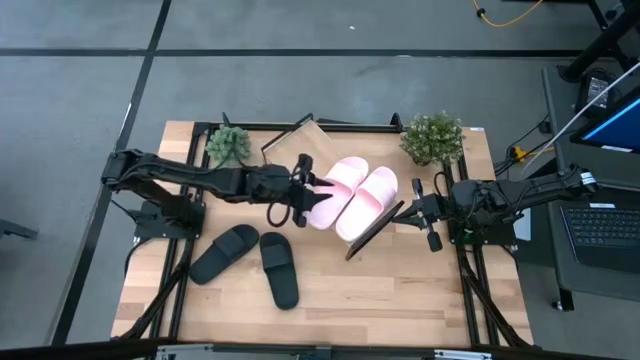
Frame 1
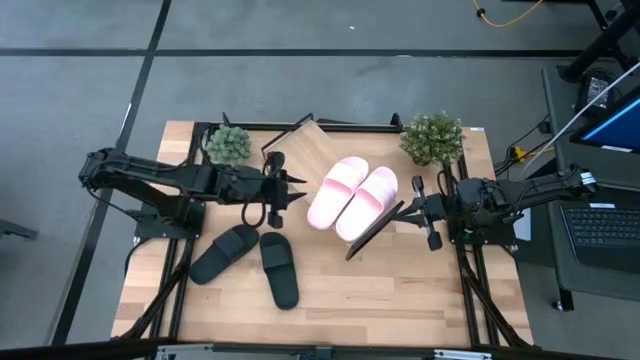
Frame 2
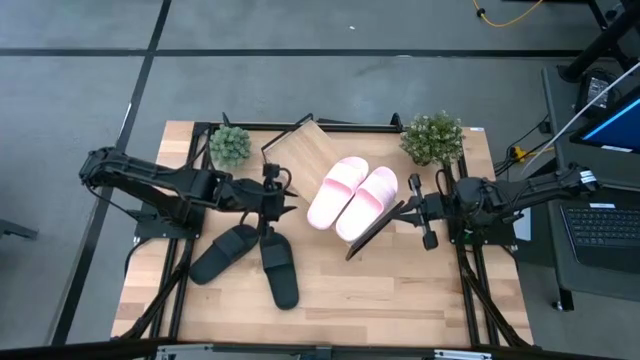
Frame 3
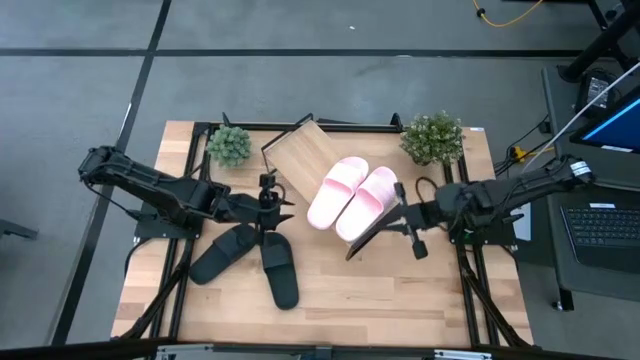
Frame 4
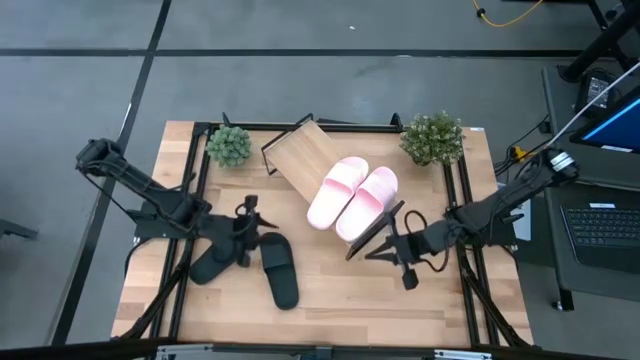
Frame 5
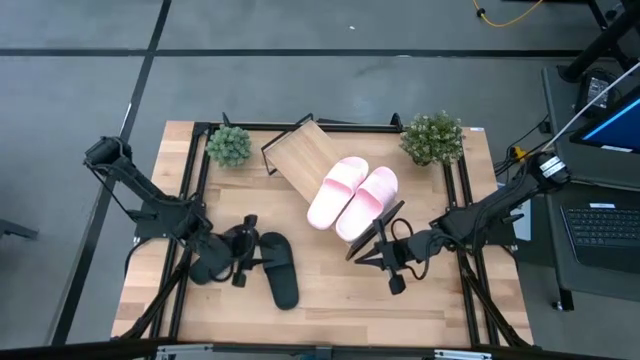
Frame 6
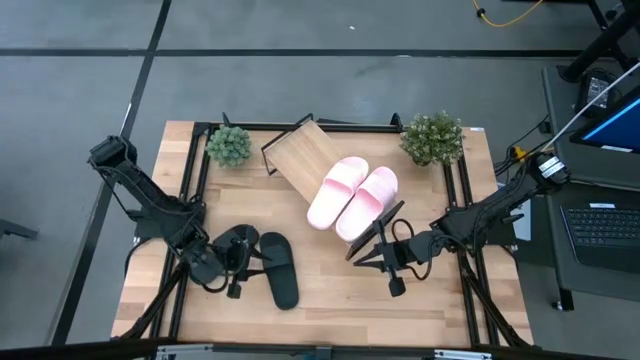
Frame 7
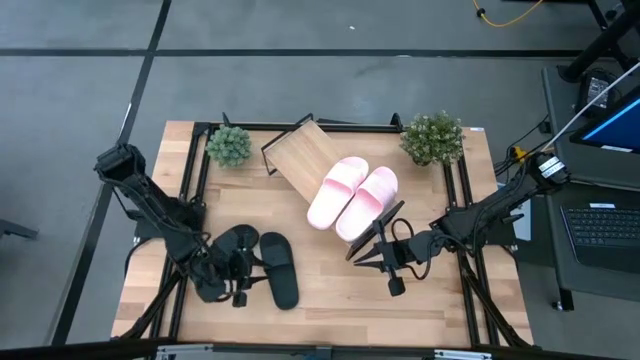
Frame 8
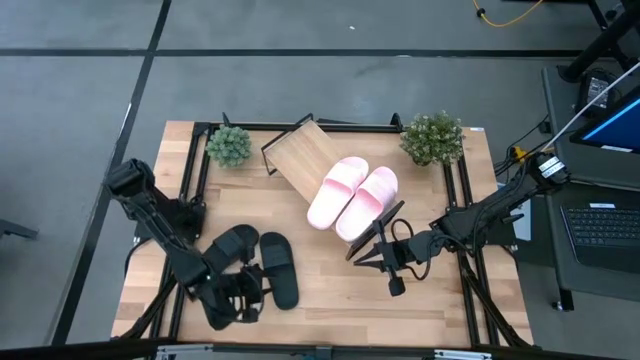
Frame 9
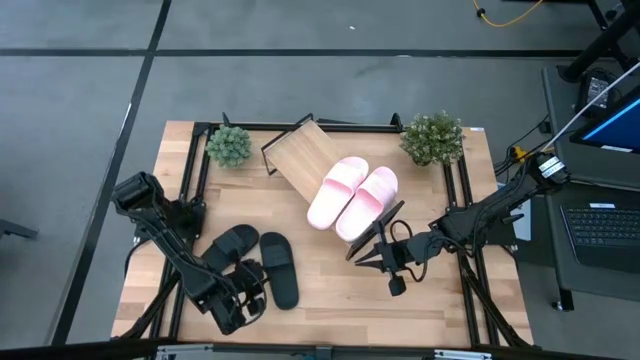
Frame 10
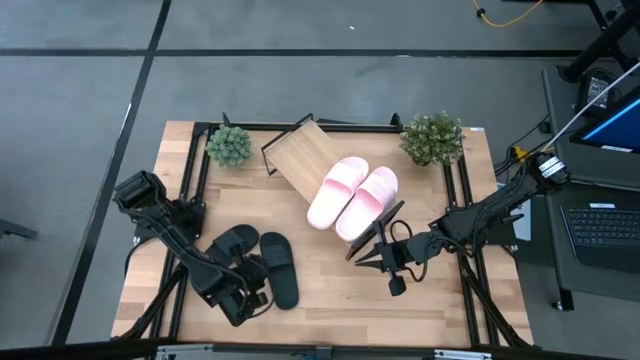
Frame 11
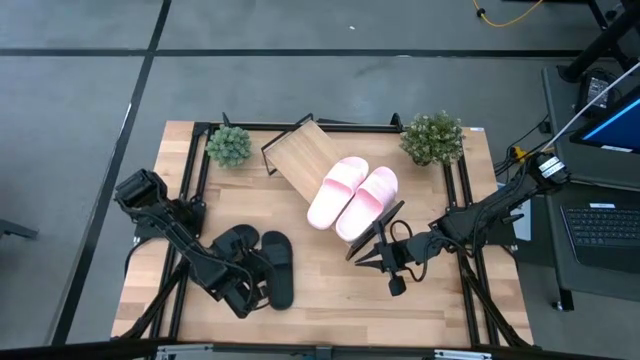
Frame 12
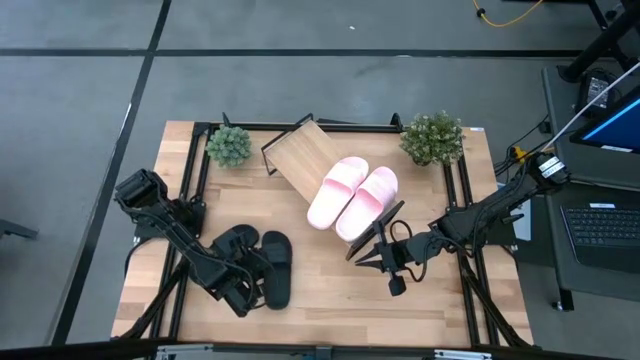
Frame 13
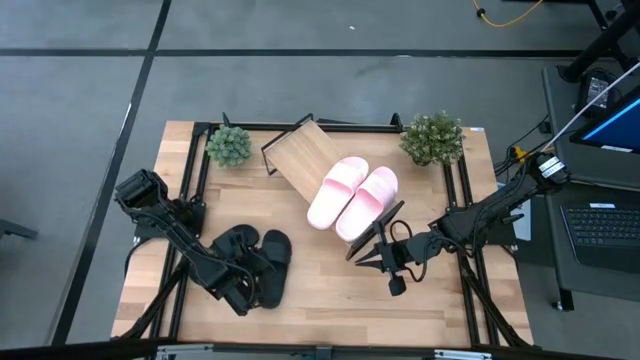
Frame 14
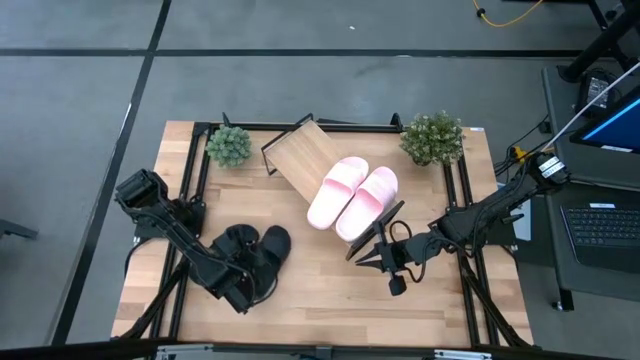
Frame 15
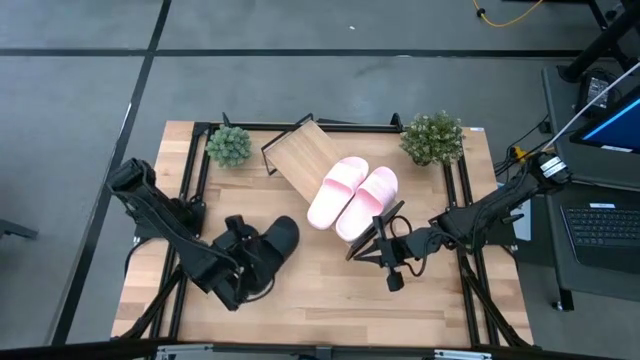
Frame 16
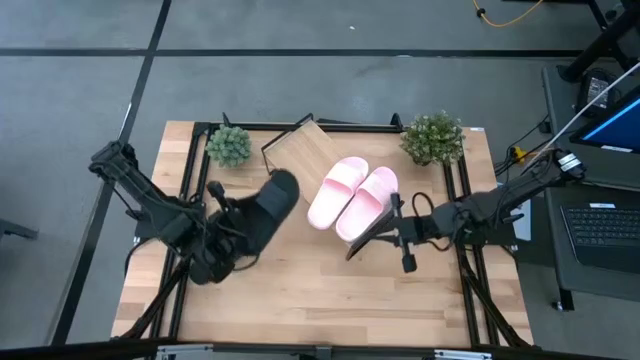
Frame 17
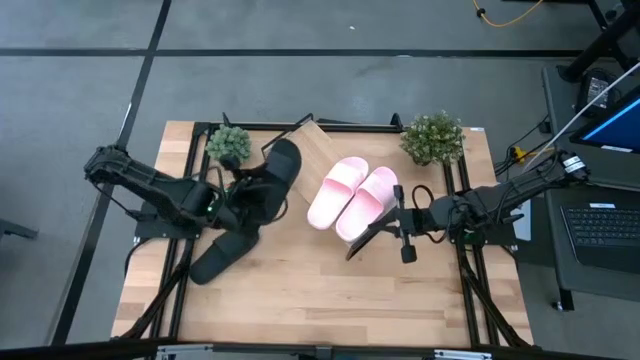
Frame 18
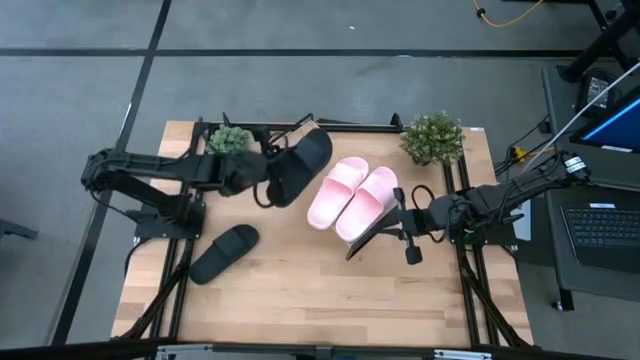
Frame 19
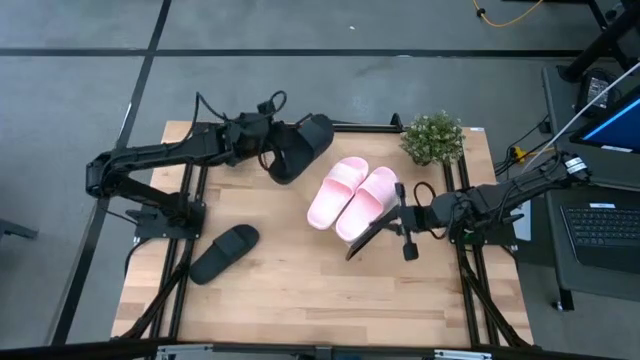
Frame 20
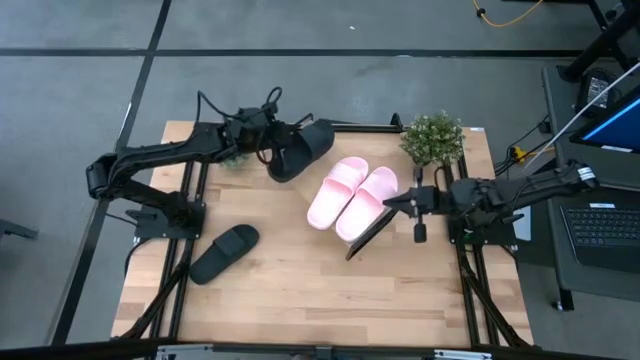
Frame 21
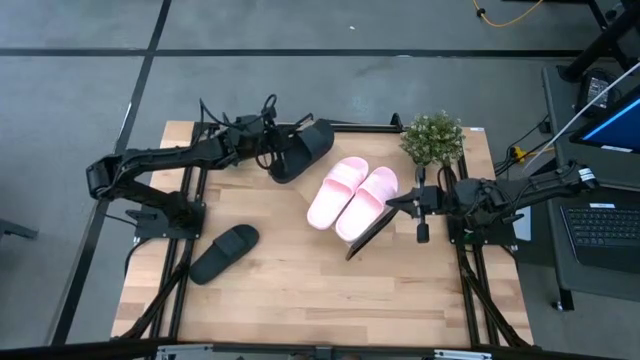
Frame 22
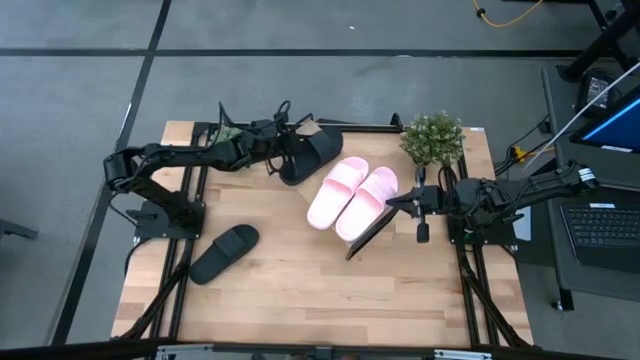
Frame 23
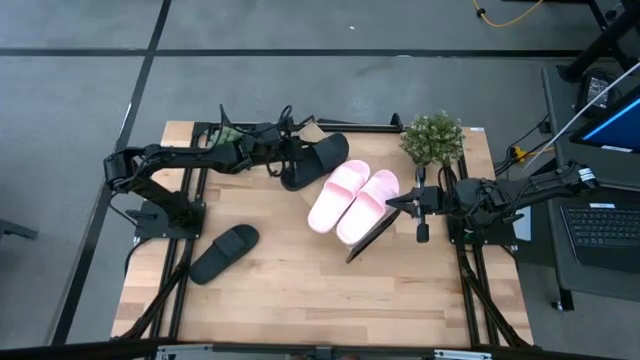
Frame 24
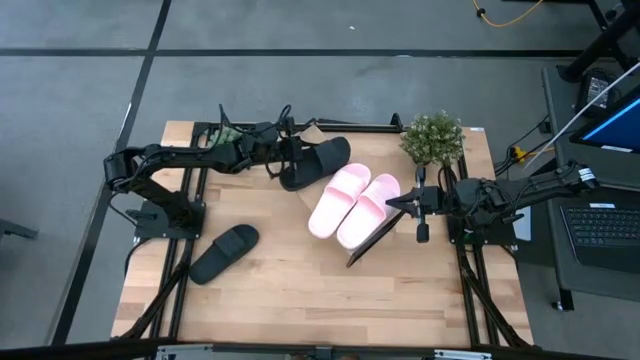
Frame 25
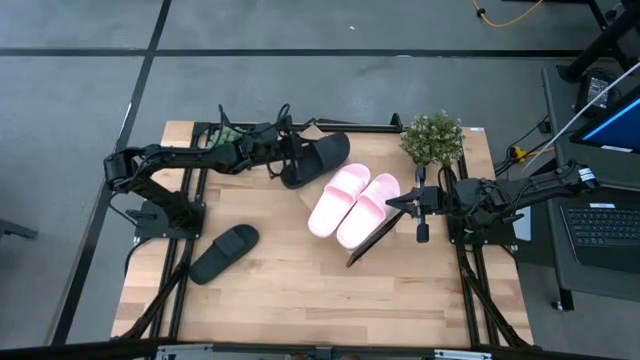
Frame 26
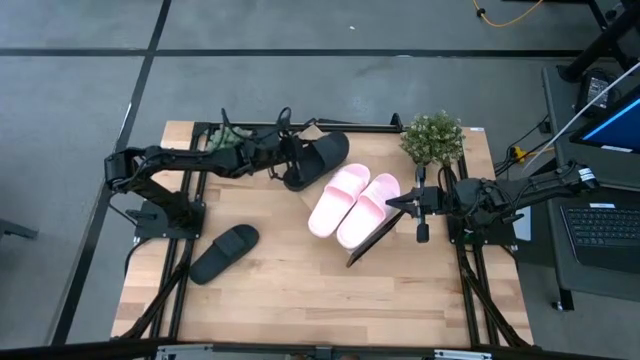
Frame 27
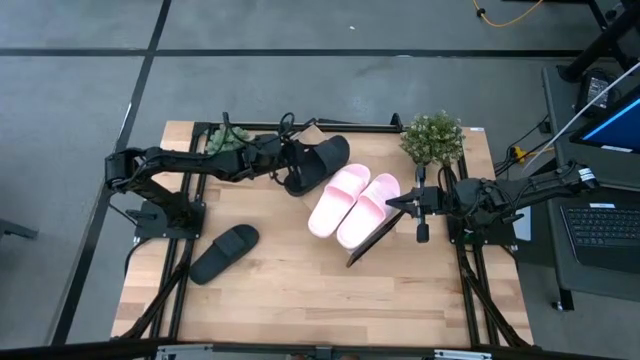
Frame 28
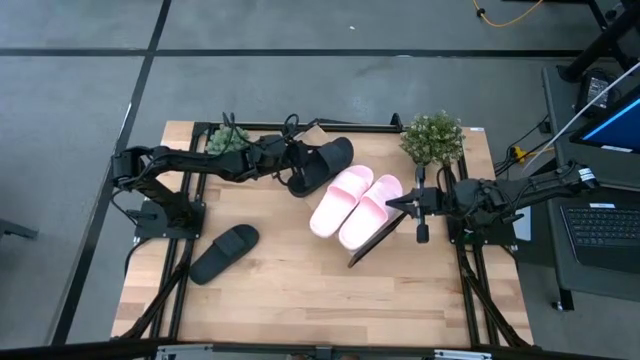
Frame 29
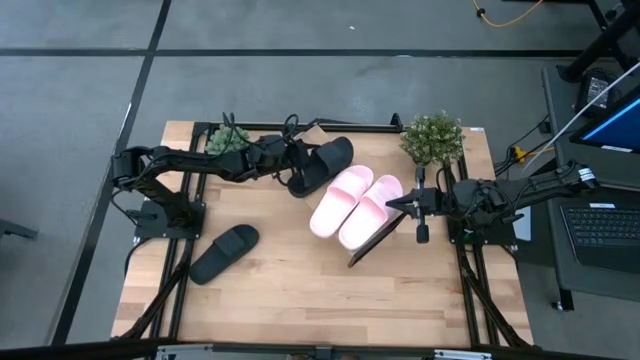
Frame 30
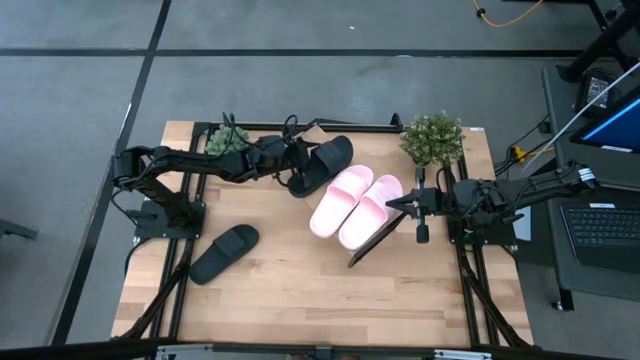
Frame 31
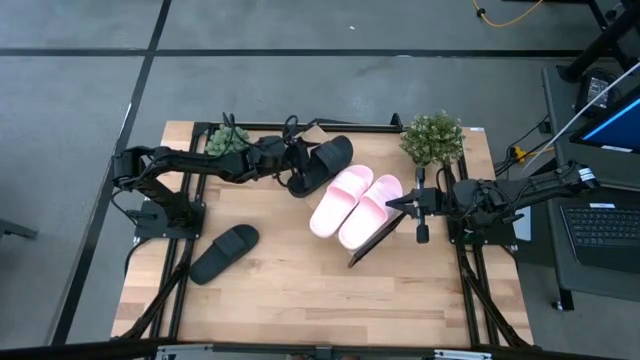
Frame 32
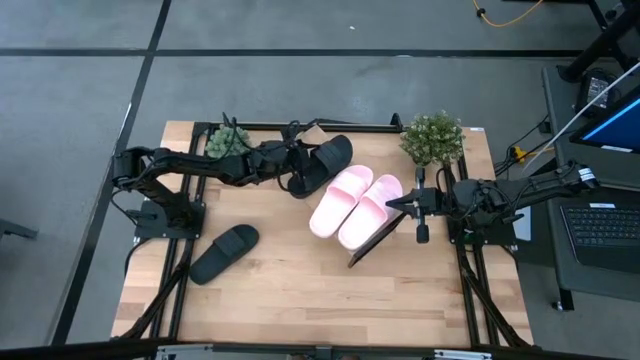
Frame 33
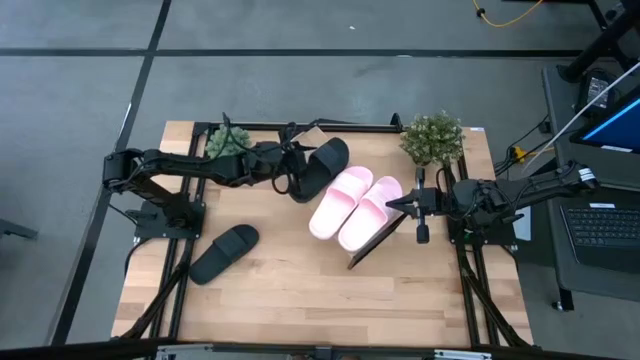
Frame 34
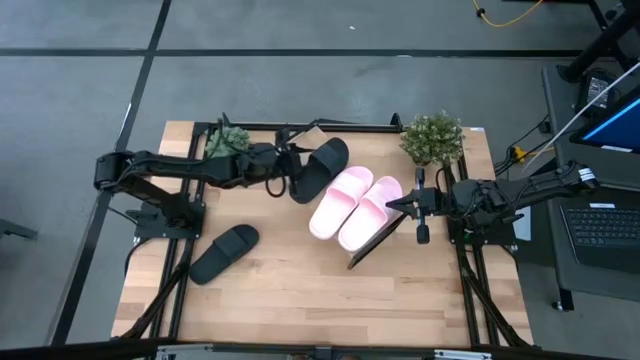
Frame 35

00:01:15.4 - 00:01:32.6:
Task: Pick and place slides into the shelf
Put the right black slipper on the shelf

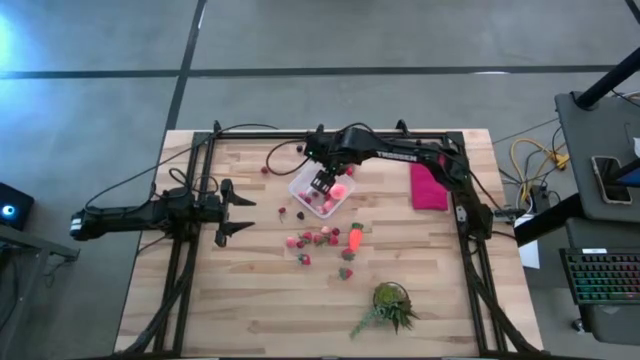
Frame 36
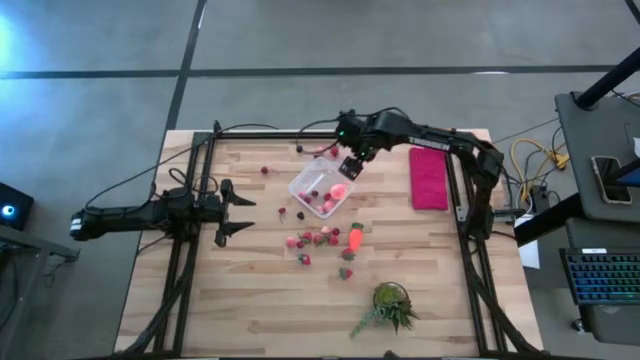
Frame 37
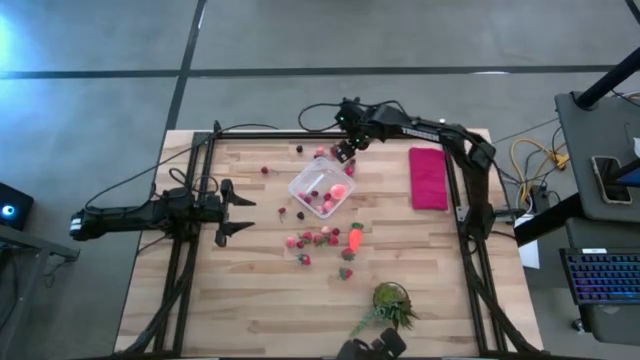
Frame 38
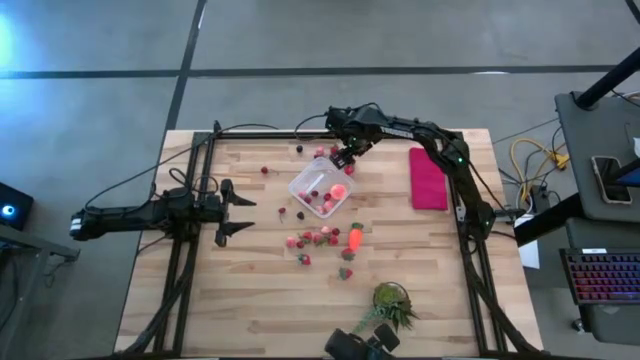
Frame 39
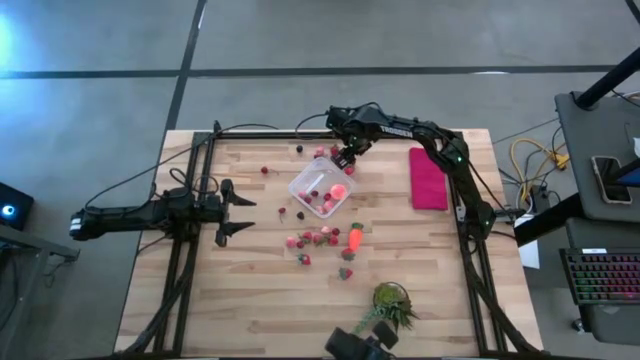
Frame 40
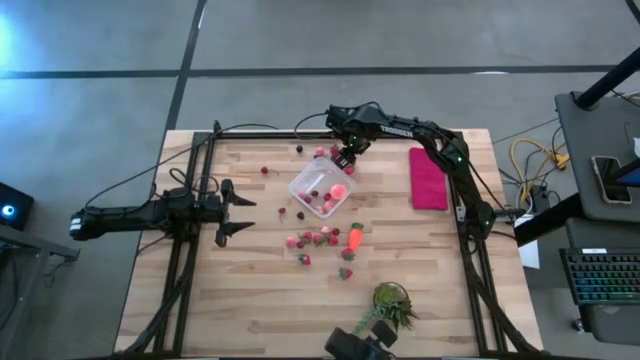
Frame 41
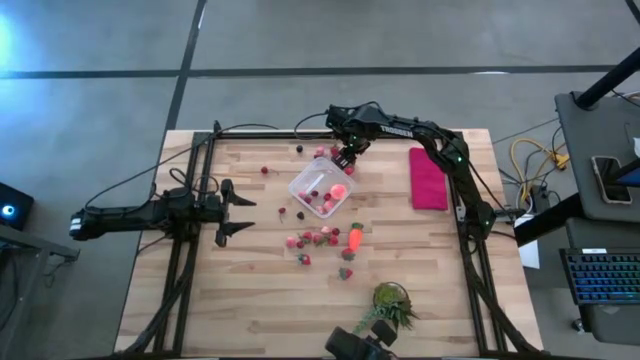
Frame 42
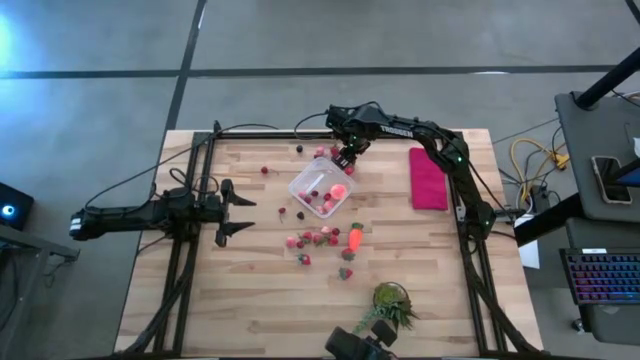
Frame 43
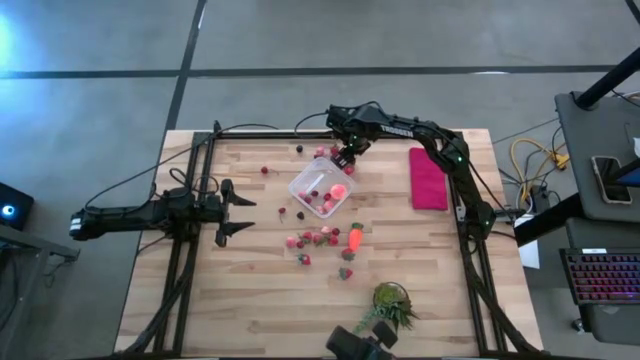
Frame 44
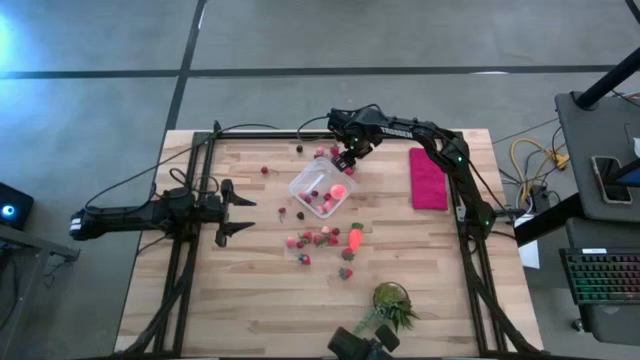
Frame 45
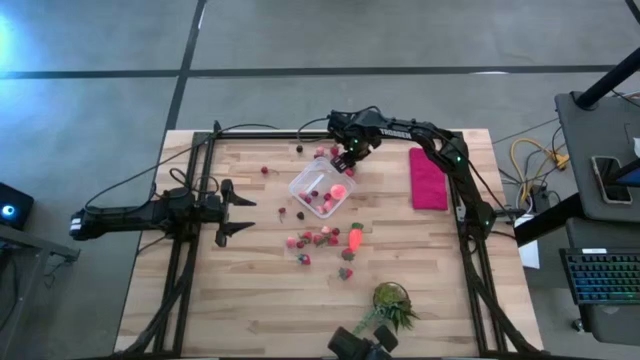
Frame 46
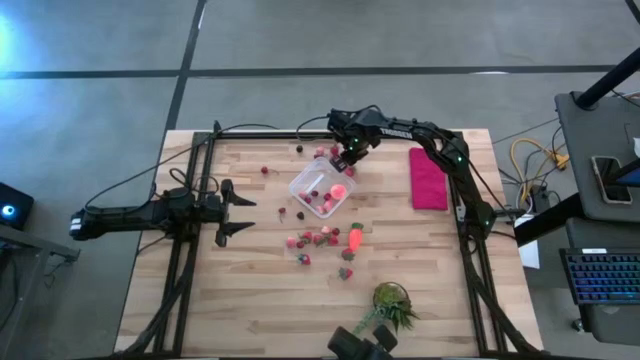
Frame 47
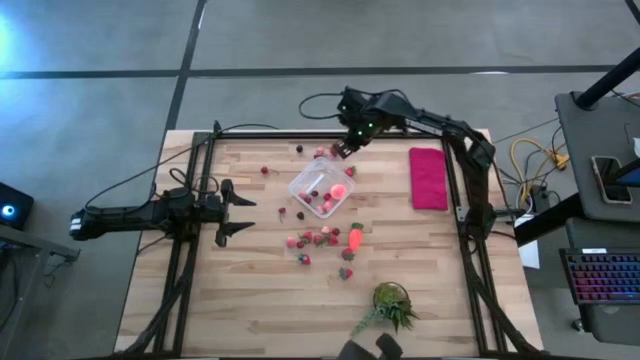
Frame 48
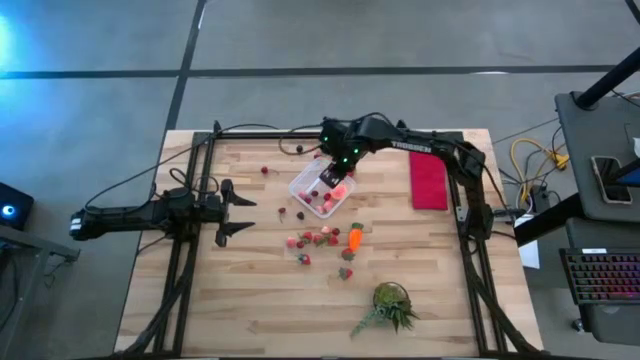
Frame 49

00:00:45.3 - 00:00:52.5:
Task: Pick and placing Produce into tupperware
Put the red cherry into the transparent container
